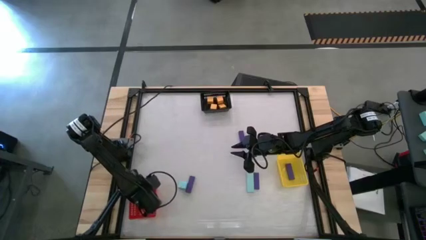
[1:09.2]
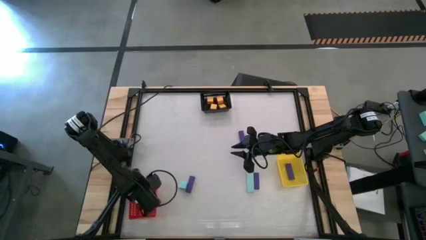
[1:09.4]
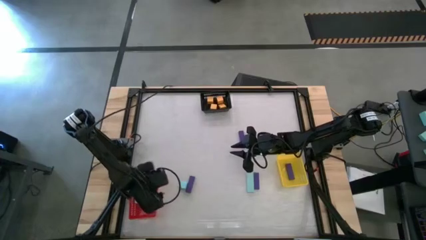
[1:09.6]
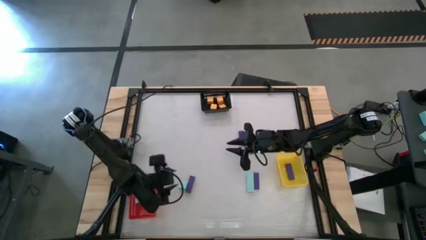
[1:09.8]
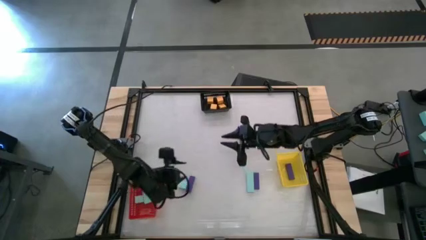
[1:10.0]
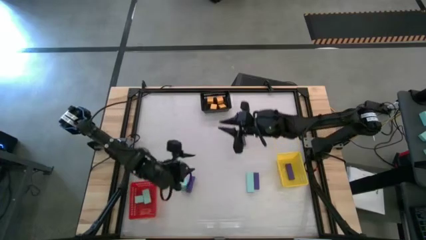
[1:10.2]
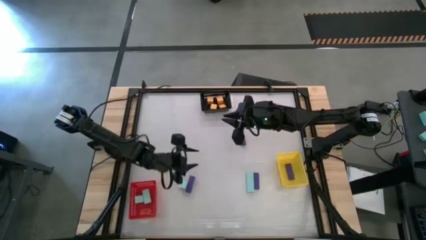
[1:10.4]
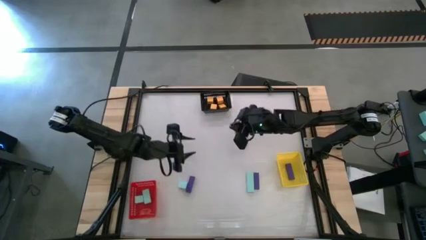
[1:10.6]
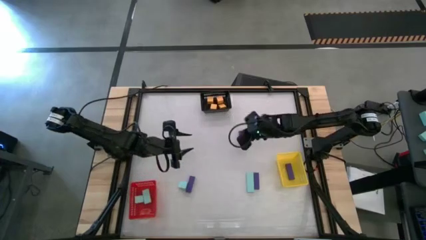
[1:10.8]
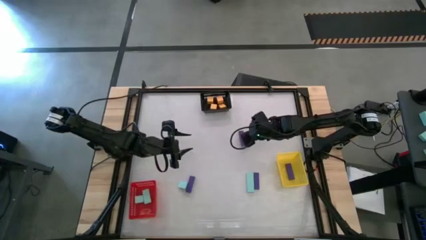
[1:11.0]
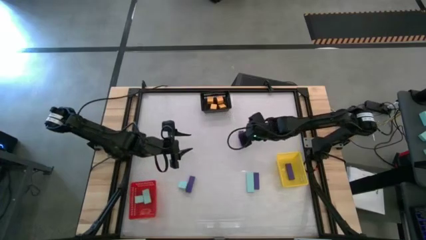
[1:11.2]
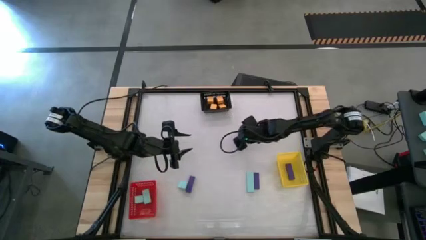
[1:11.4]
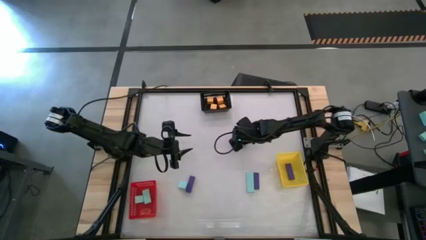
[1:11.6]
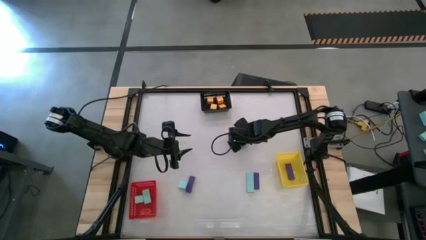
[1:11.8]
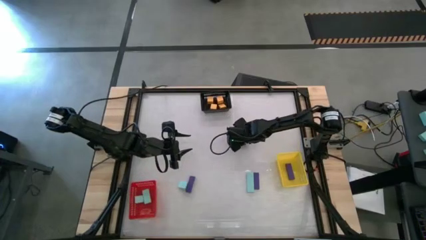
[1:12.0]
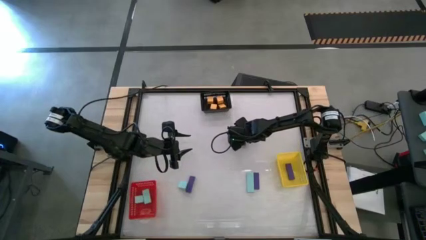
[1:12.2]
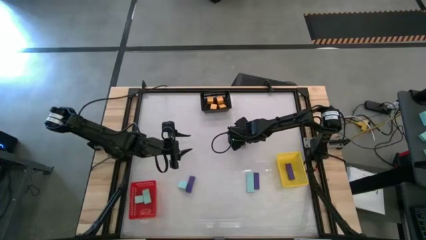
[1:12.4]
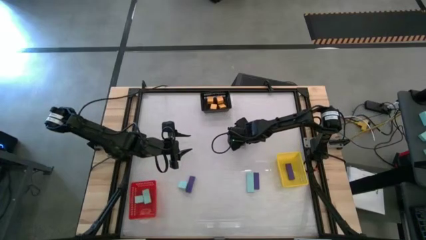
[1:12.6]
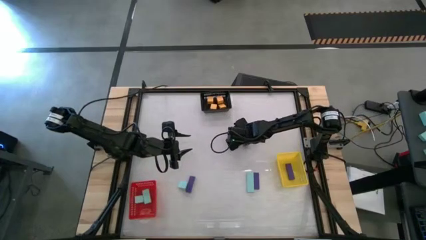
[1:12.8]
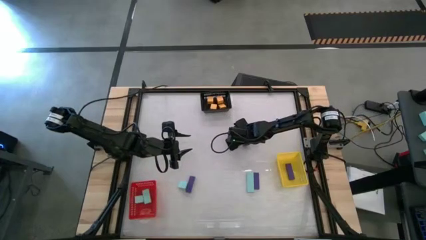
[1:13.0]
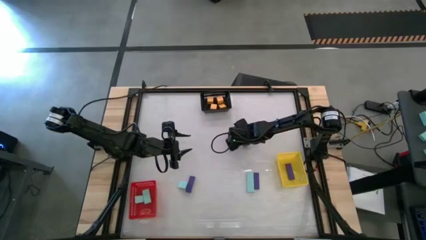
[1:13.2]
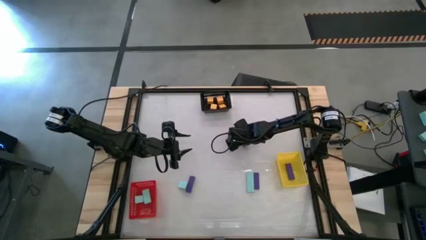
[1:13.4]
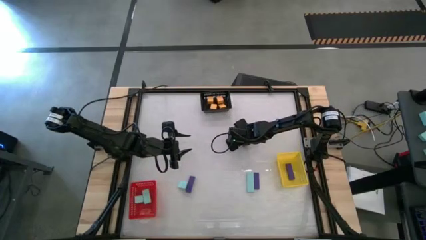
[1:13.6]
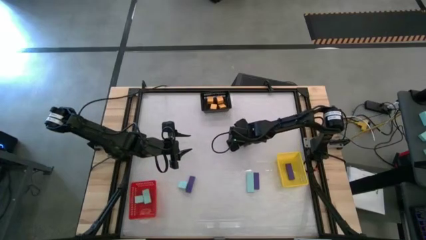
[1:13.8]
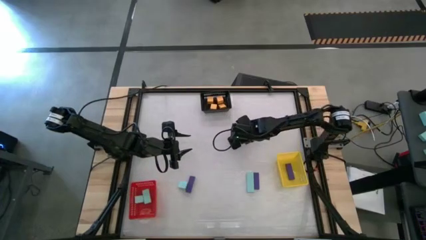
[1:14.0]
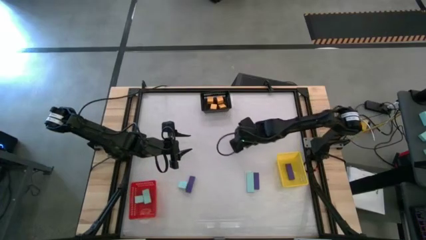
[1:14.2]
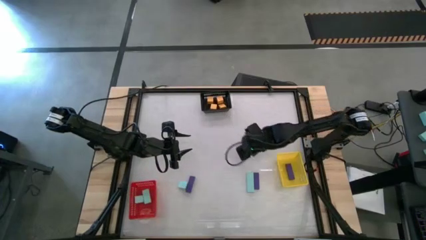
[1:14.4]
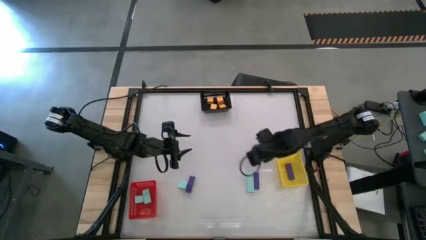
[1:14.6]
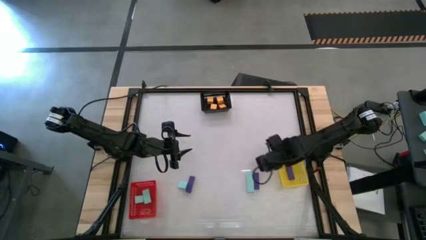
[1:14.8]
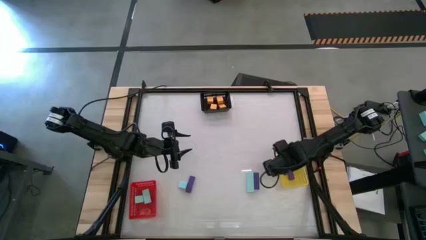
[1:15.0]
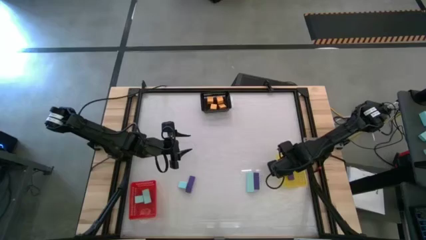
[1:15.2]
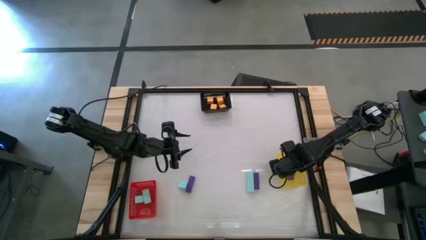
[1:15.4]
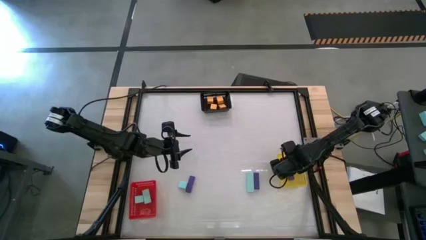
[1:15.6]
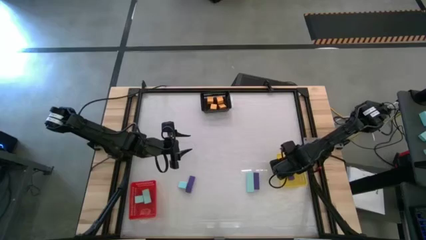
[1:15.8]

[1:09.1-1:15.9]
Task: Sort & place blocks by color
Put the purple block into the yellow bin

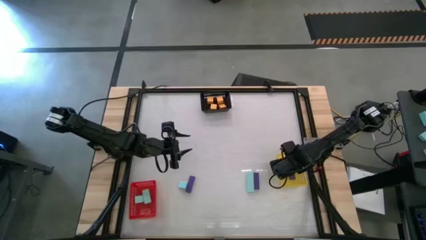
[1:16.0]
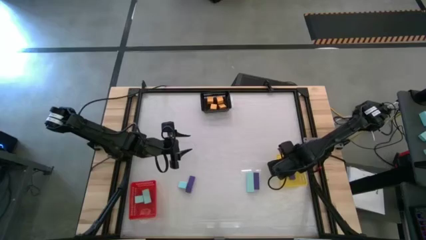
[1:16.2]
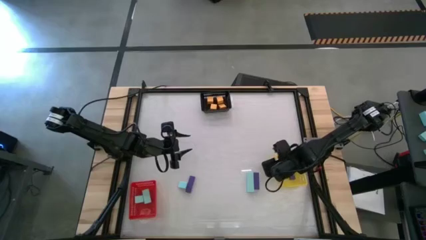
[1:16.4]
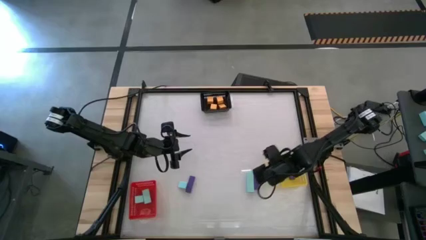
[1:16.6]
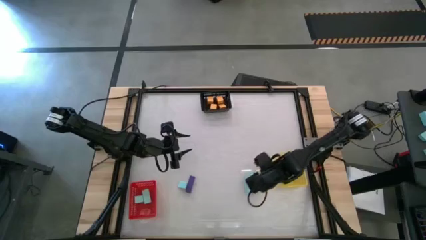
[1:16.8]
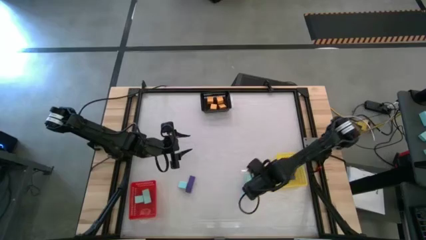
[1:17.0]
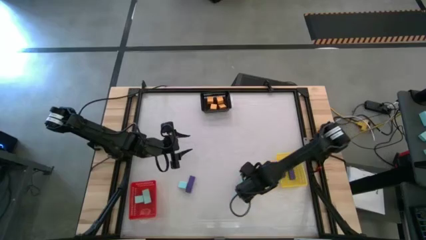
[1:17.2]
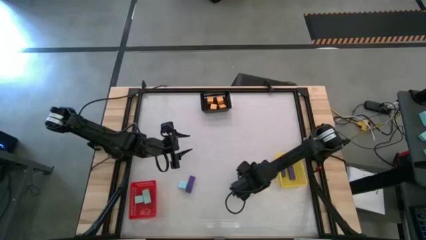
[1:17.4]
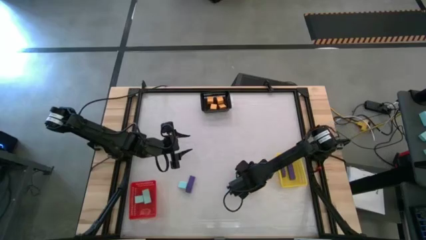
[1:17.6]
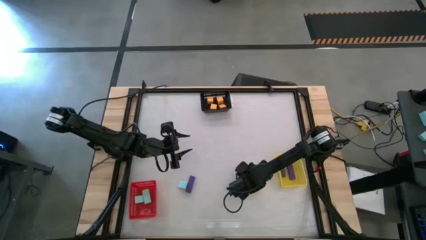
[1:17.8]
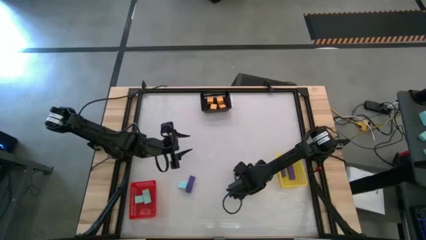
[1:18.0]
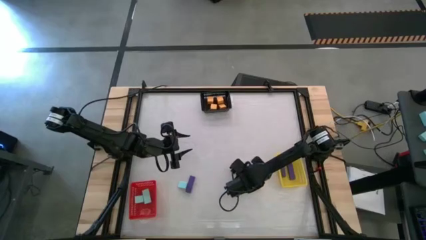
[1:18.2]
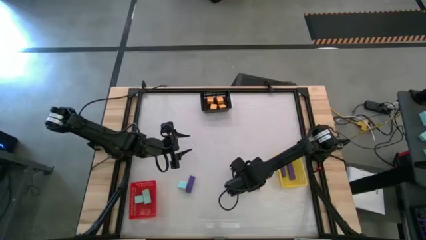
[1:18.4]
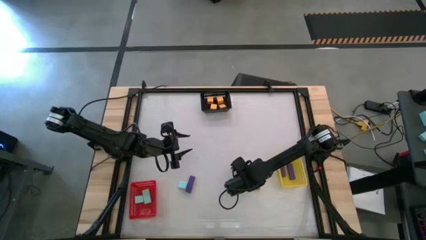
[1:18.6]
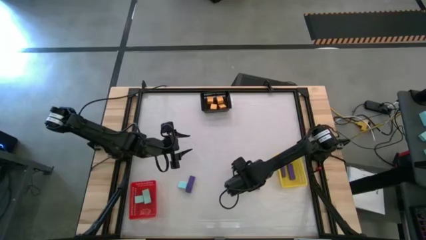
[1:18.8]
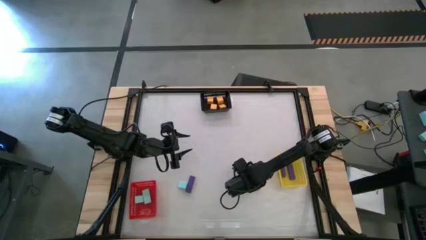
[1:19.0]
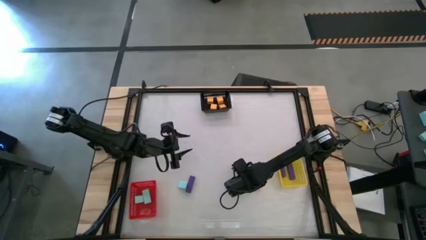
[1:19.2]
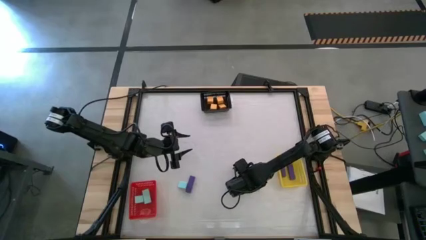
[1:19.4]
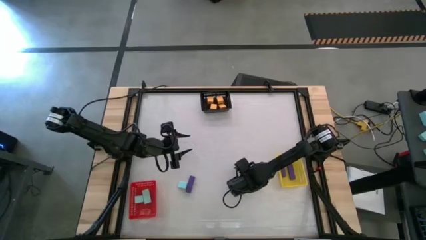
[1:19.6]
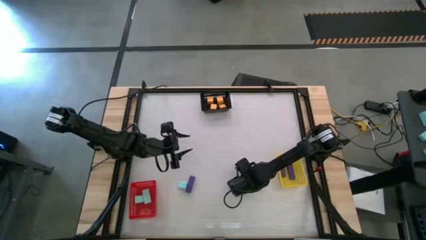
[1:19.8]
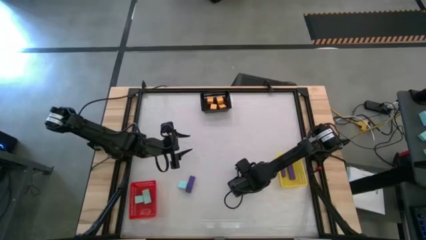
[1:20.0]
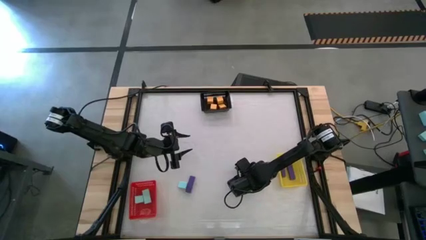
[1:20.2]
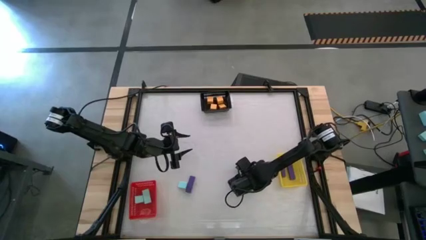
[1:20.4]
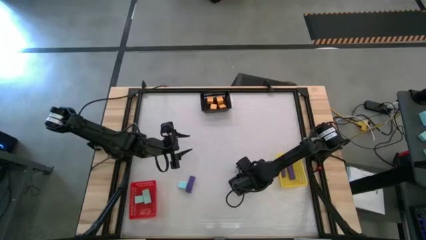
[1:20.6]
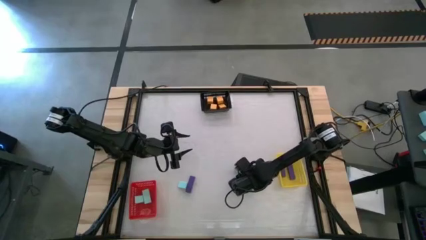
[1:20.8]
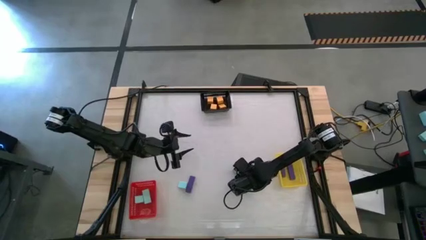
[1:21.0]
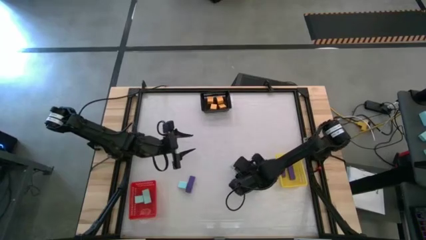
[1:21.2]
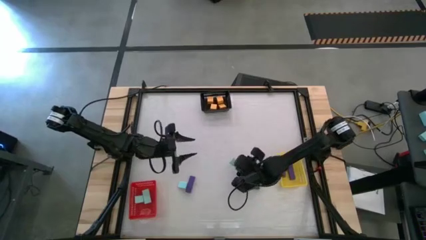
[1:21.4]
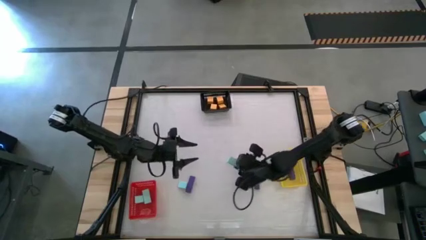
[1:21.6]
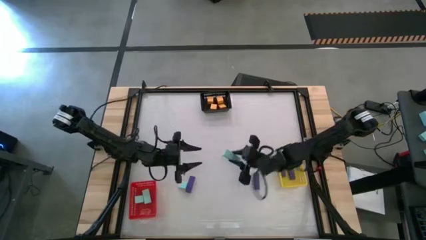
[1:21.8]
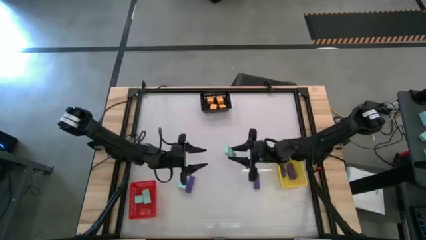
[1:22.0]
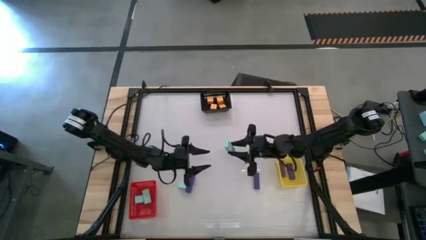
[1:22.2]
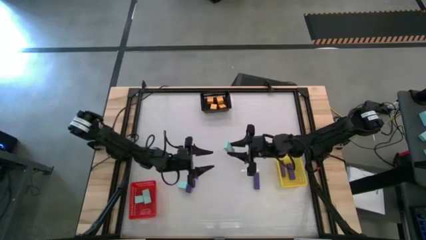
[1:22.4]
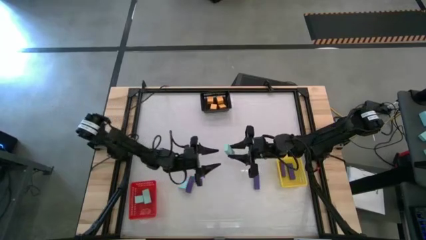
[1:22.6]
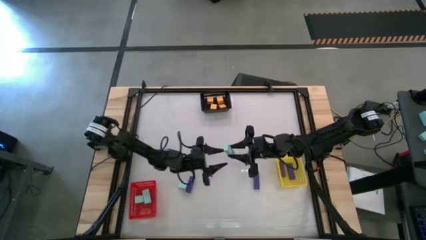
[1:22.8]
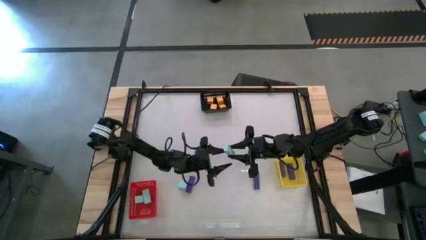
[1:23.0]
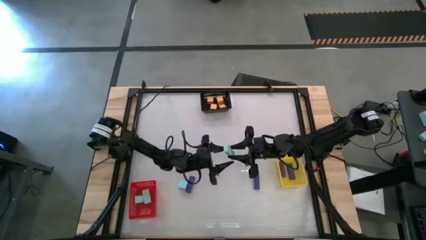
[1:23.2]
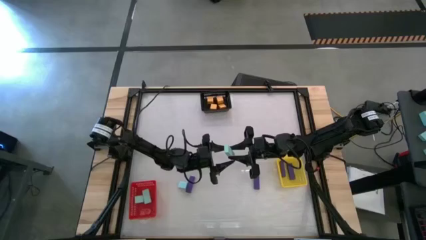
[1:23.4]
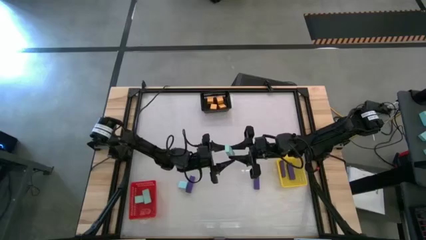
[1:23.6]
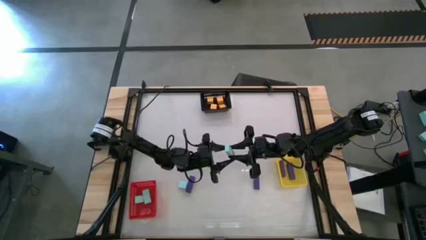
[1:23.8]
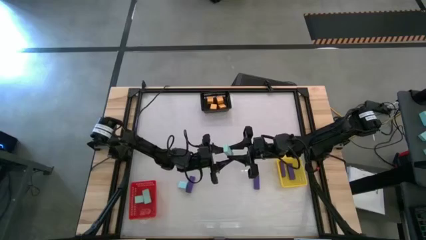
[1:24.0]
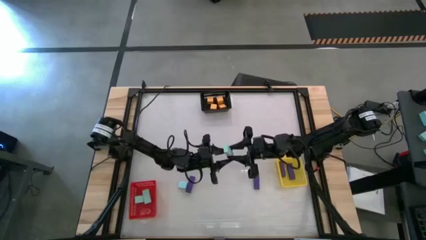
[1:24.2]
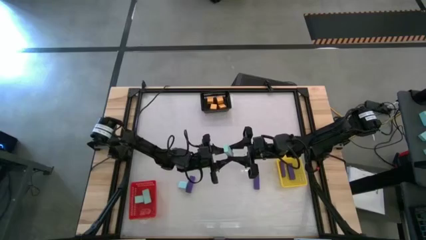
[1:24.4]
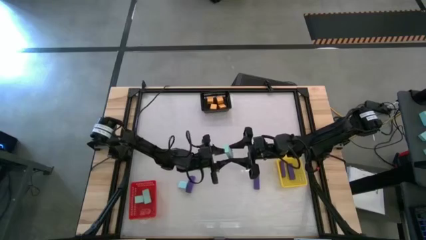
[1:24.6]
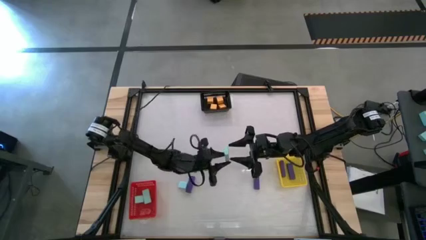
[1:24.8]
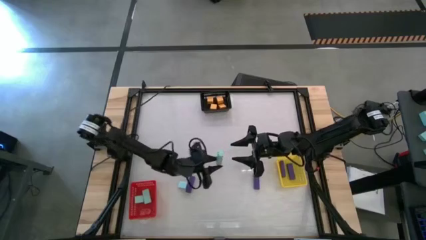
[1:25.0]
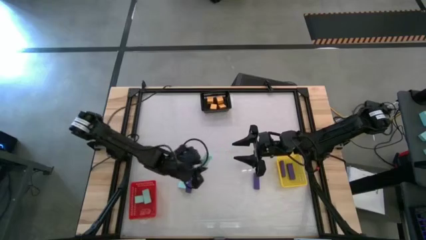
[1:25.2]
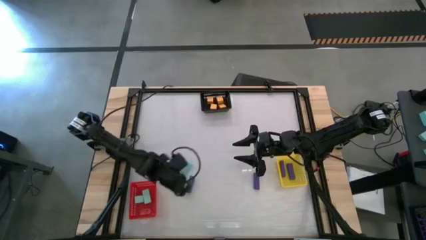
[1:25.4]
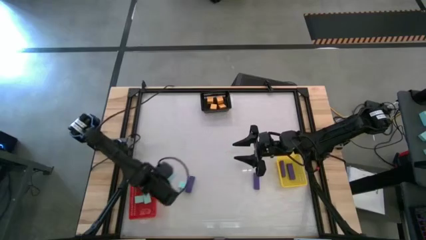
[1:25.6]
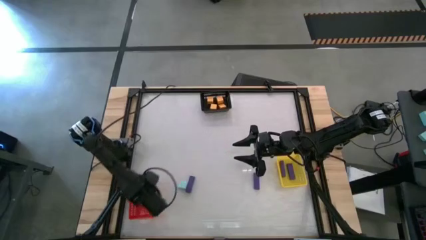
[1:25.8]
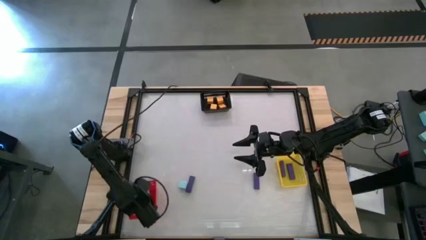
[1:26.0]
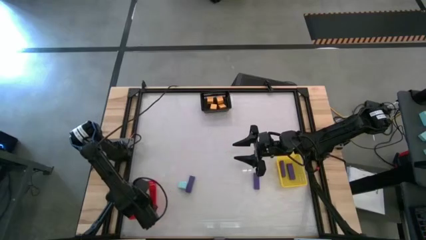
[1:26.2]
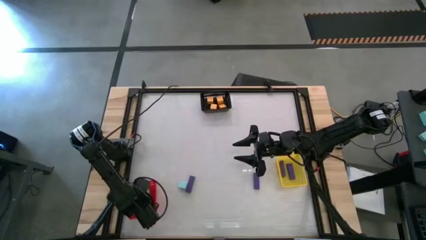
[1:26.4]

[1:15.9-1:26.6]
Put the blue block into the red bin
